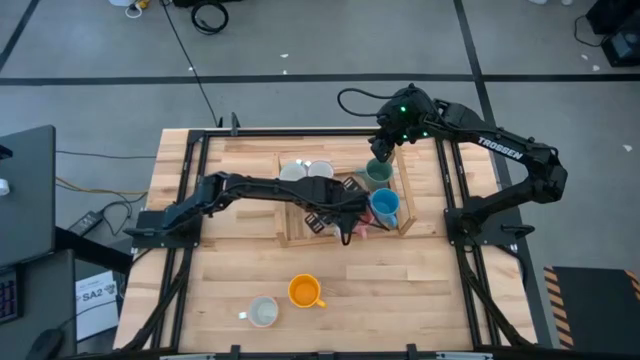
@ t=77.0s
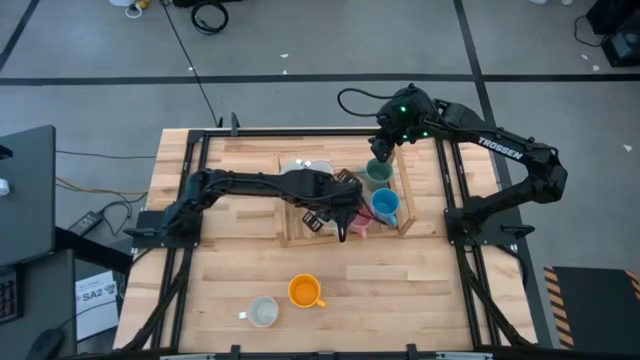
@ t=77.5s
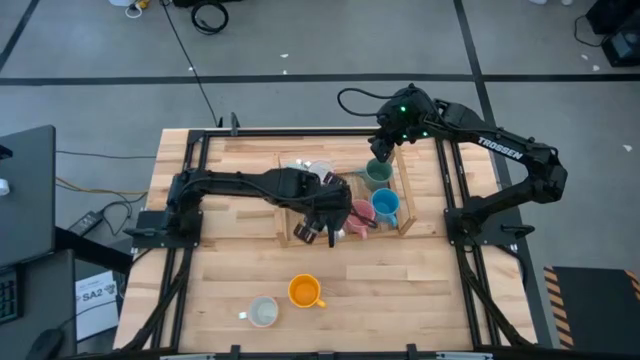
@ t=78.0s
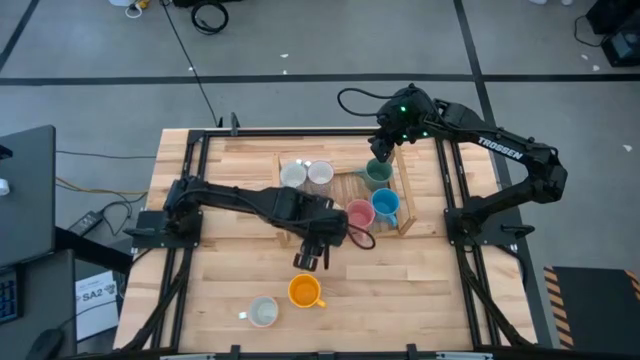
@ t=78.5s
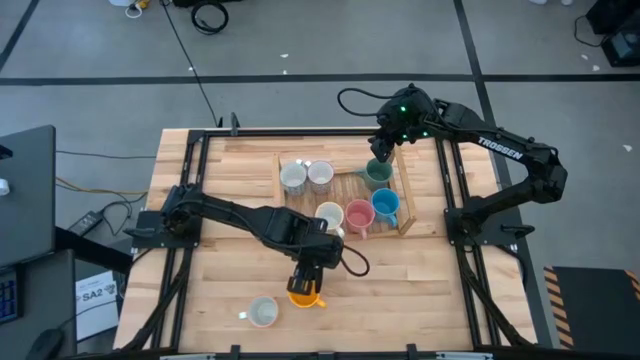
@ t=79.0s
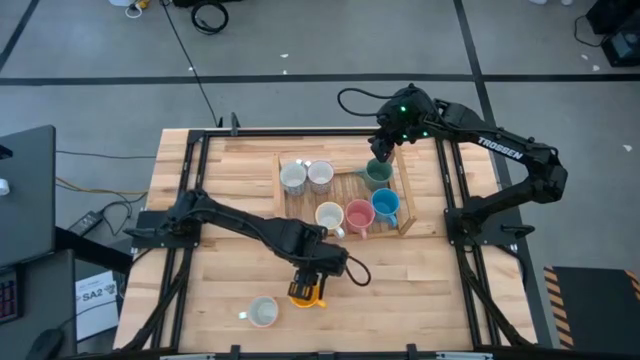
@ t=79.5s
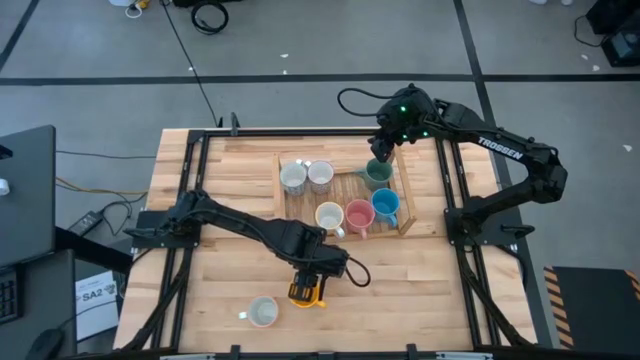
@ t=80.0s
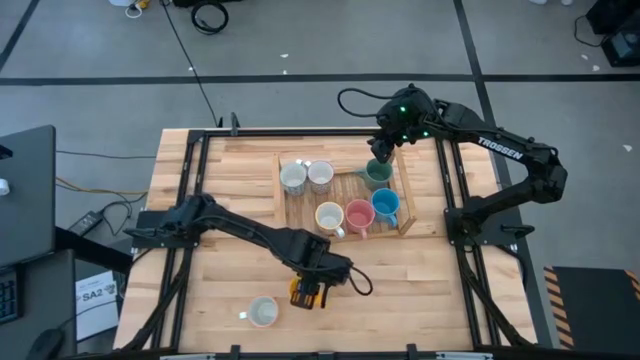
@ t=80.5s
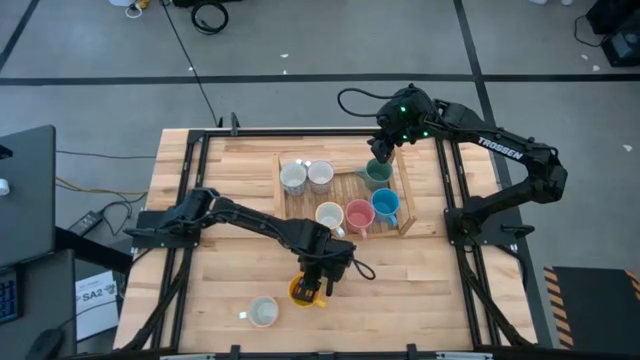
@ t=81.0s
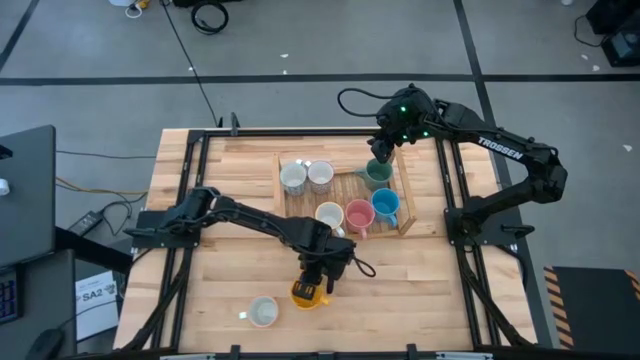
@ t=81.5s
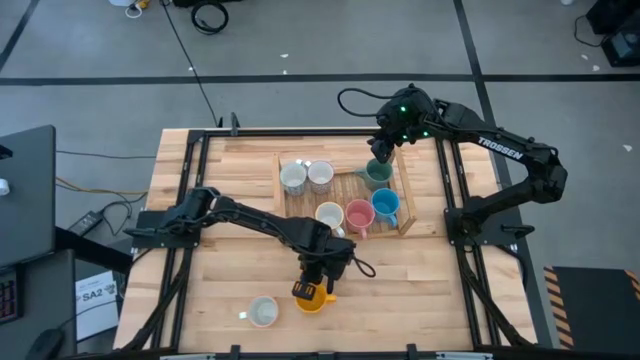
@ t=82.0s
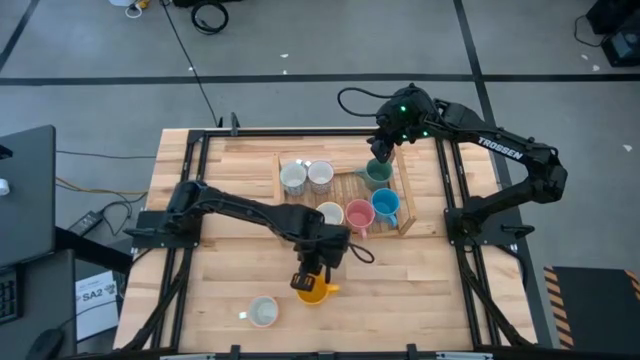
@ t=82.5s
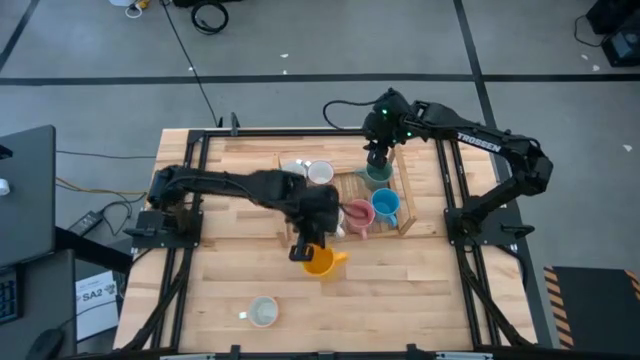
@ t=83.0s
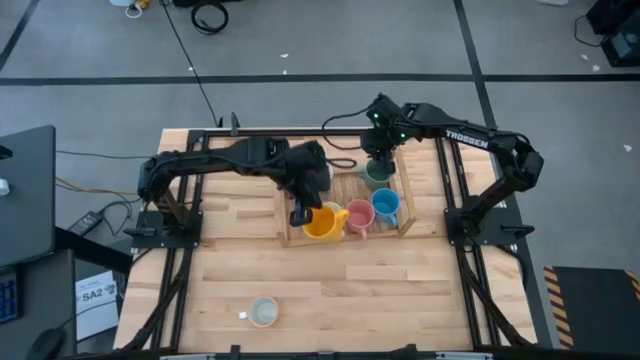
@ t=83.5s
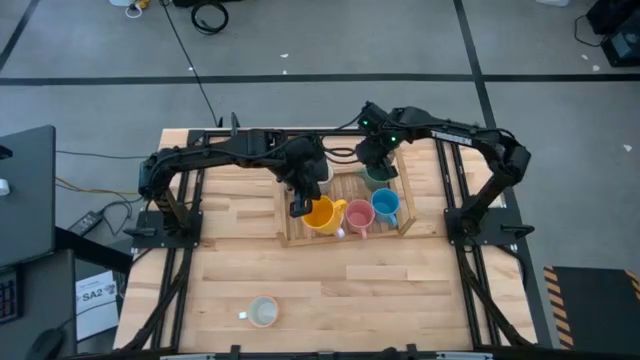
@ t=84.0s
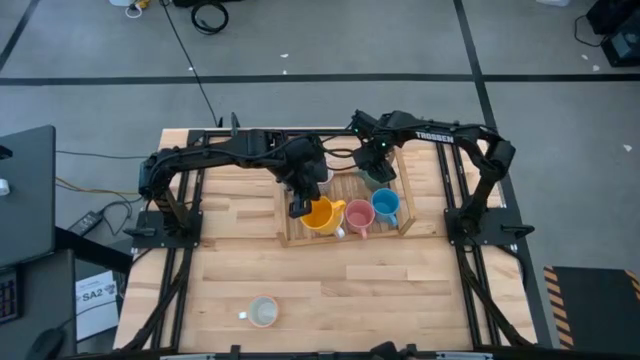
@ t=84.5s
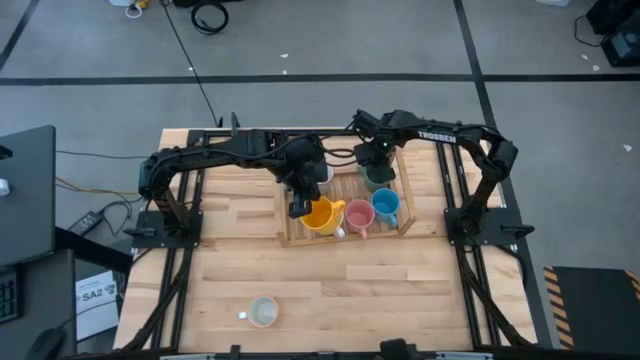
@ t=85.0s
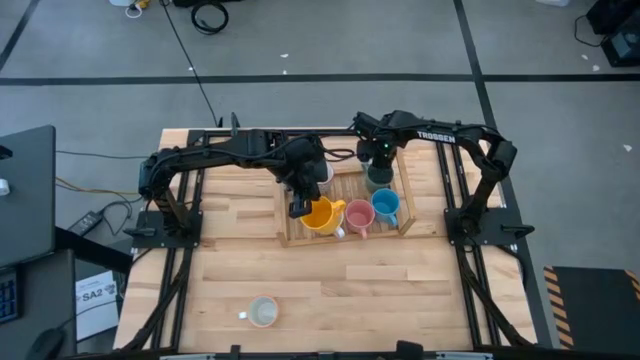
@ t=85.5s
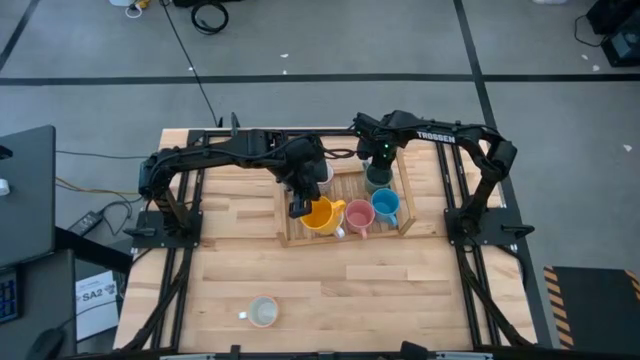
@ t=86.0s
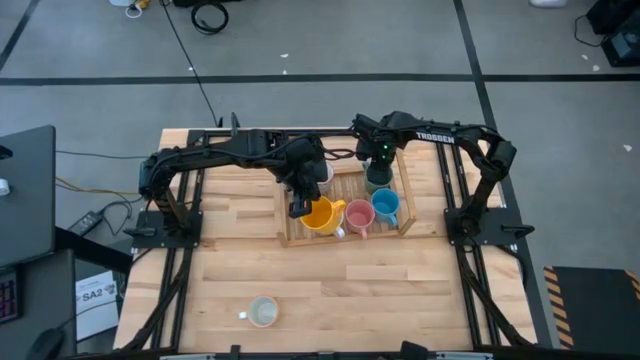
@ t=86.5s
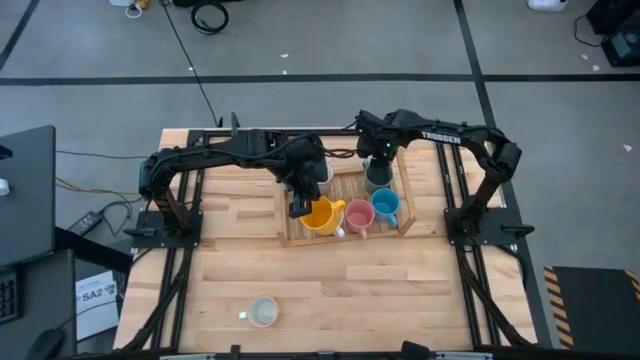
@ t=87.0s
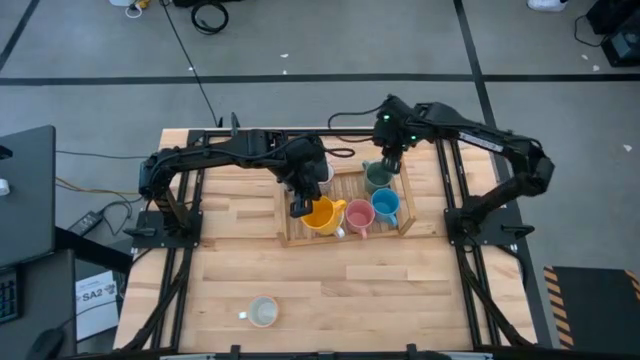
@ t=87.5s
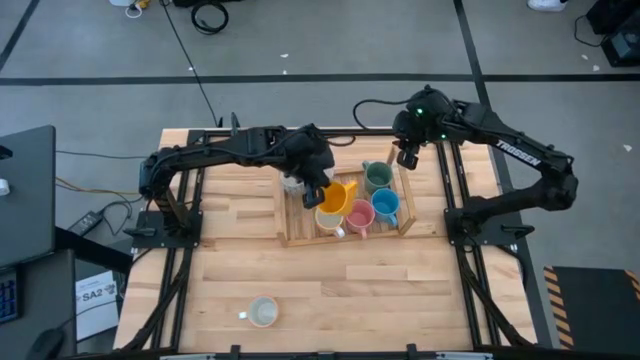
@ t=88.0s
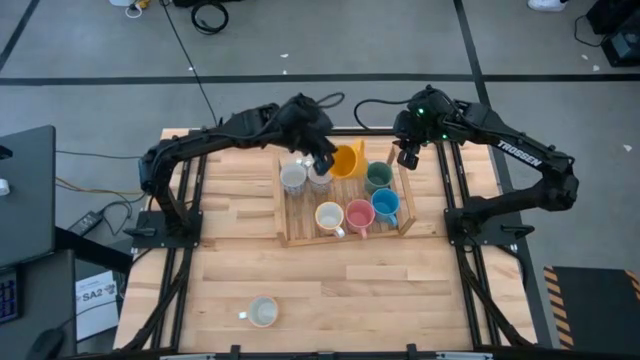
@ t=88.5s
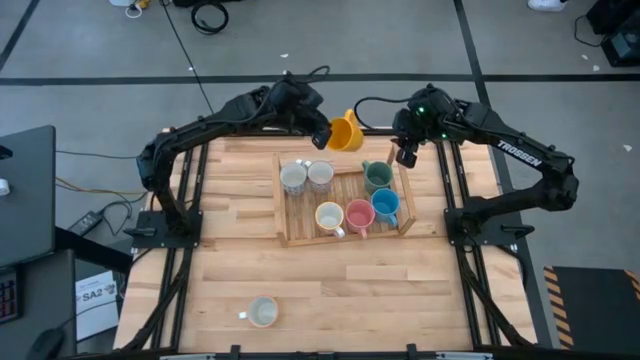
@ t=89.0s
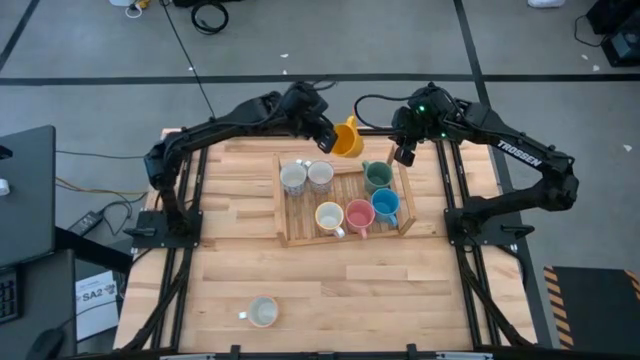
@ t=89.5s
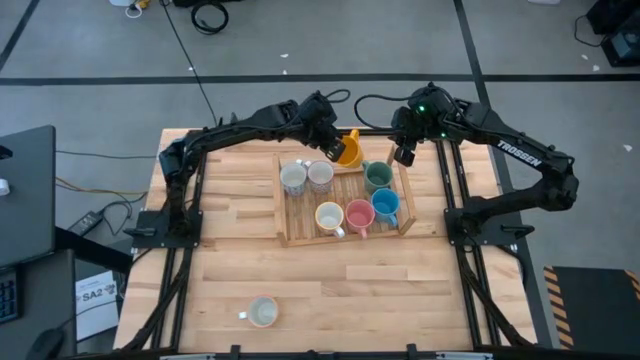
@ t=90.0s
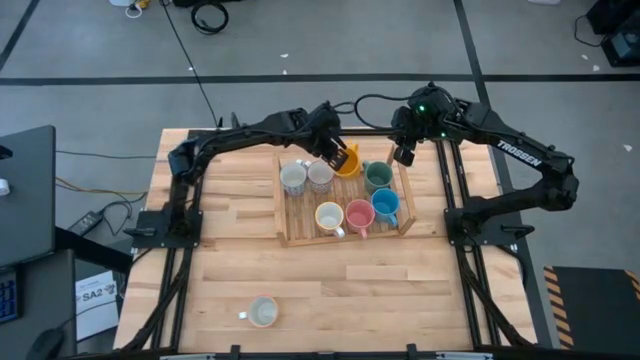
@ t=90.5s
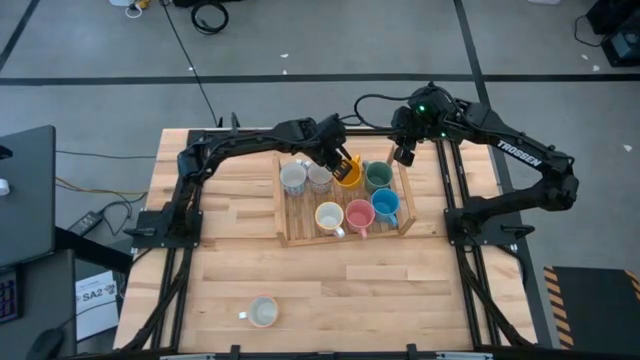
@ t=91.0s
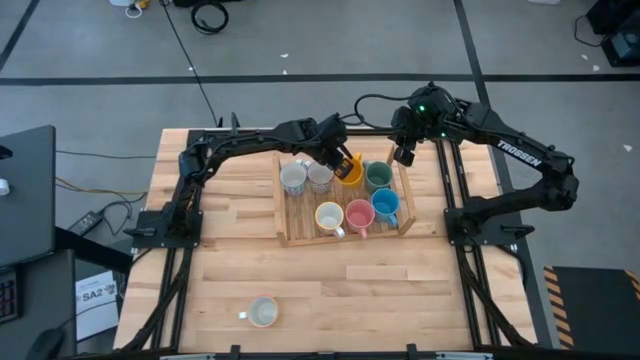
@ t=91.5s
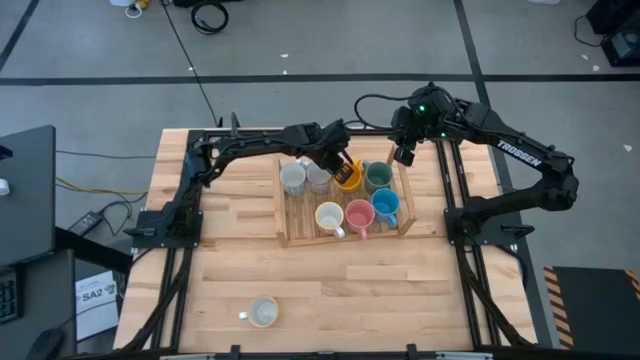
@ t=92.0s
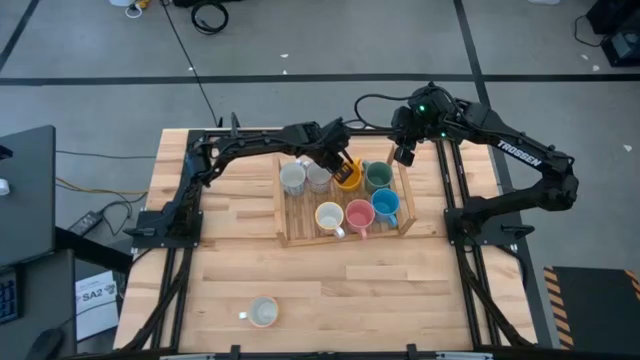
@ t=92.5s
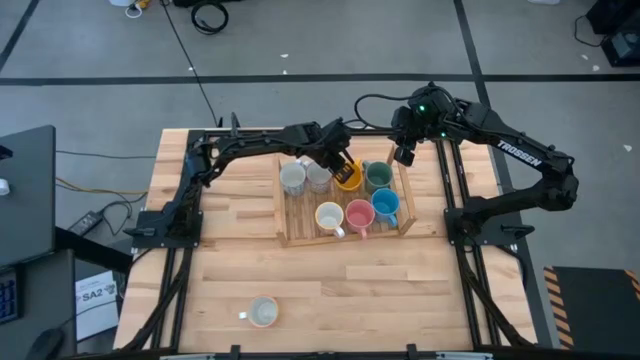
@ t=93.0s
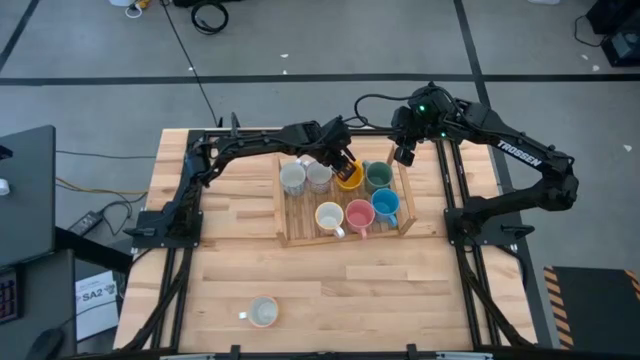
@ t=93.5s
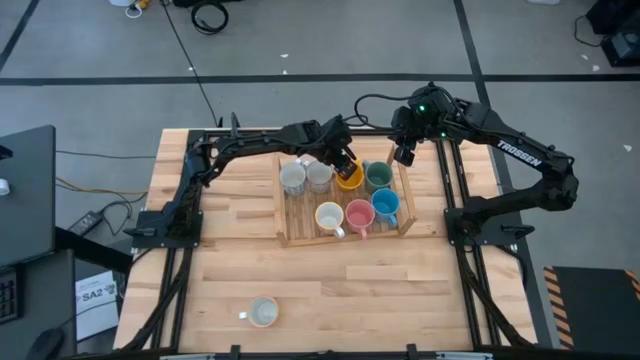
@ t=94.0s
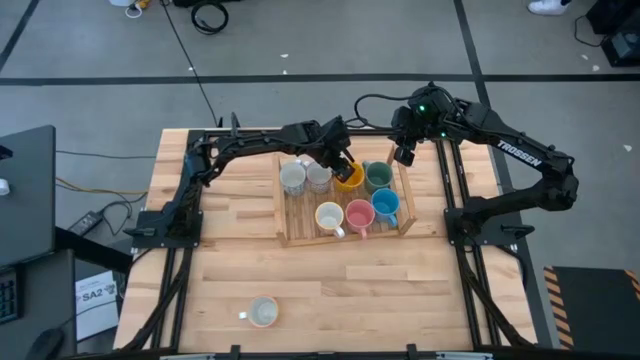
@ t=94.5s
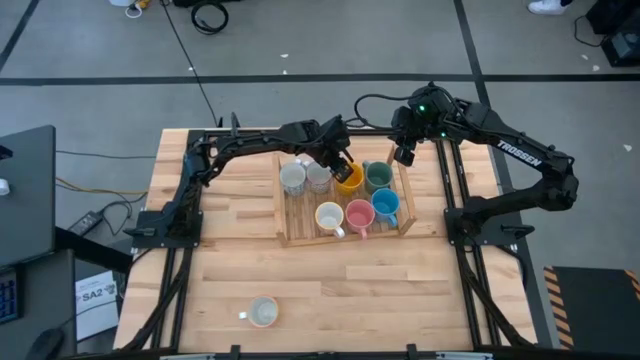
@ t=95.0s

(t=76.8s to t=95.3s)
Task: Place coffee mugs
Put the left yellow cup on the shelf aligned with the pink cup
